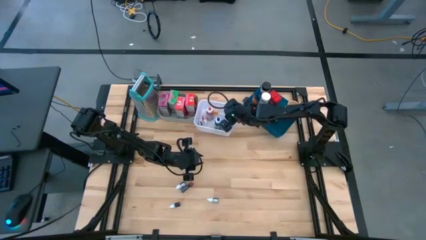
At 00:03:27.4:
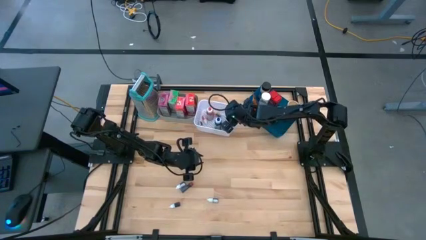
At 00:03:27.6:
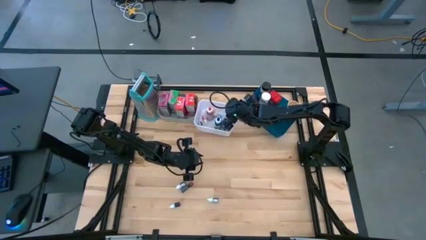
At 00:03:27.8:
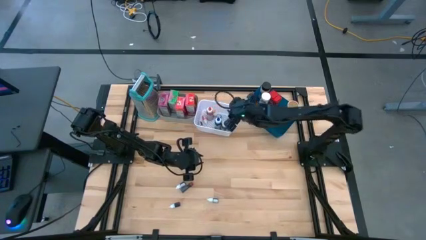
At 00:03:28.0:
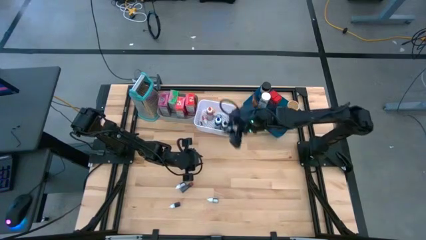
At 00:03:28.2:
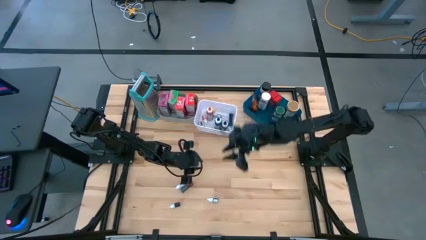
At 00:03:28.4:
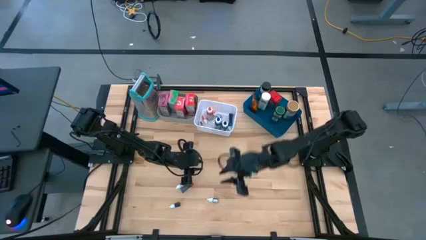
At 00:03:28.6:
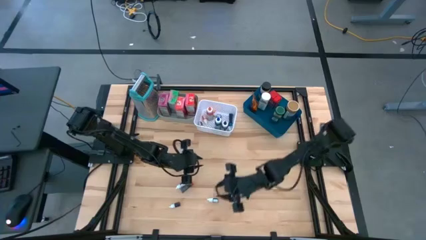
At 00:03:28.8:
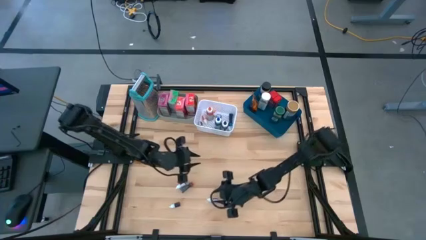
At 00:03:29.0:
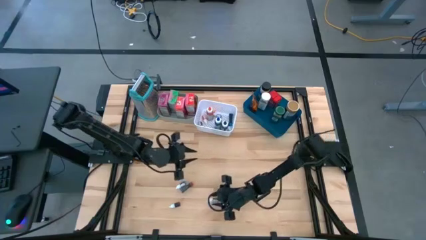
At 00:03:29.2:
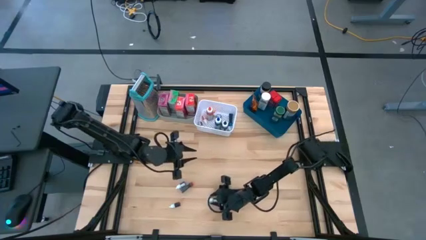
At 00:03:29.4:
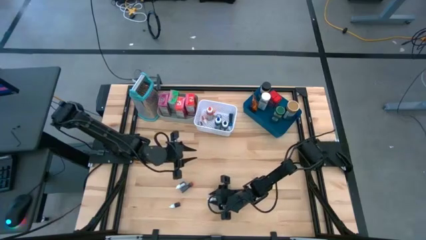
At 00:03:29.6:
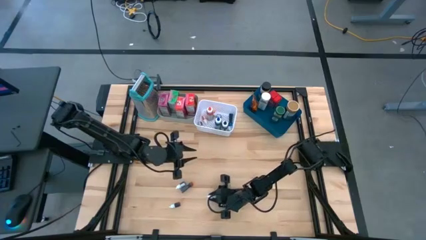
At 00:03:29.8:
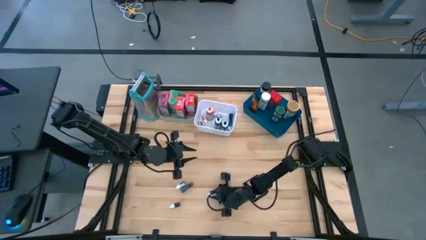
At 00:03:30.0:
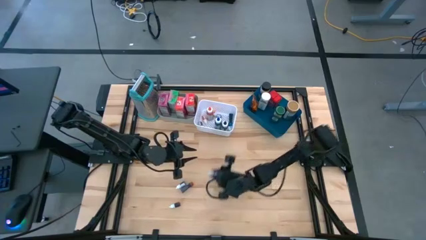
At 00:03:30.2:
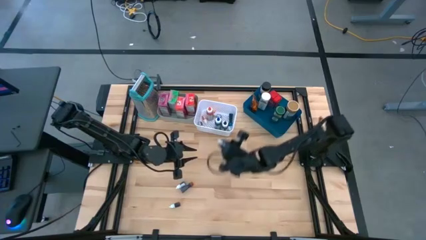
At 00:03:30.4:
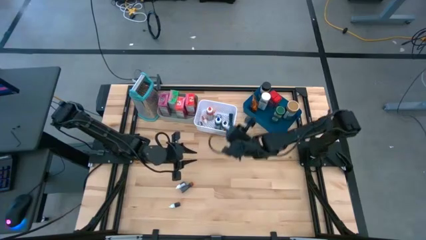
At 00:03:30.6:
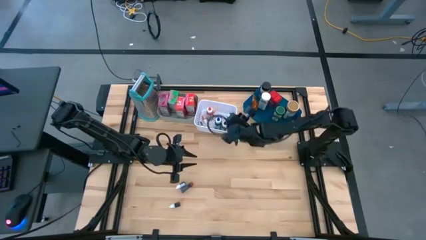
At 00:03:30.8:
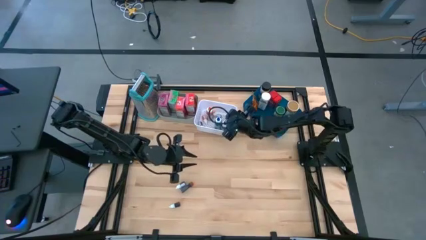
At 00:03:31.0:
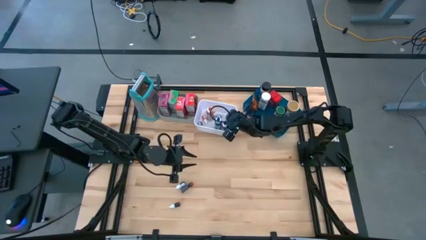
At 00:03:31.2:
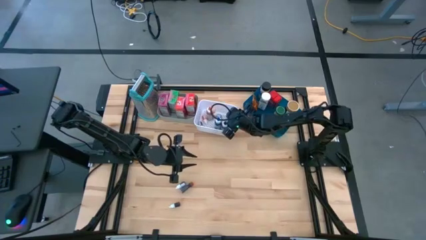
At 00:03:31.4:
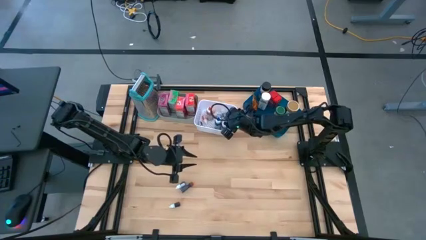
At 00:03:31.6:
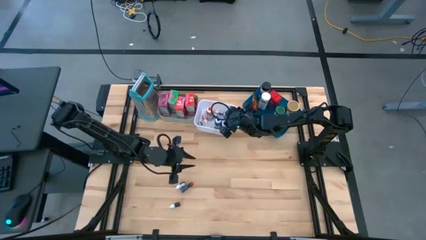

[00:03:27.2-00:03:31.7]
Task: Pick & Place Kitchen Items
Put the small purple food coloring bottle into the white bin

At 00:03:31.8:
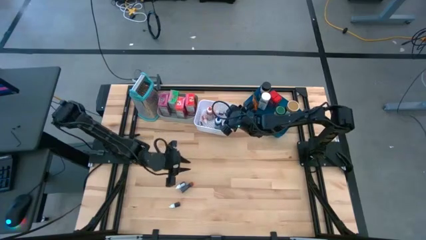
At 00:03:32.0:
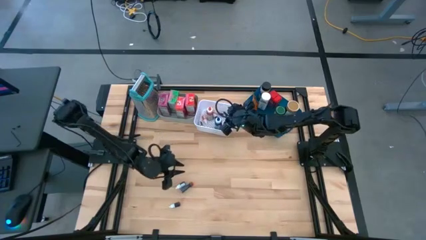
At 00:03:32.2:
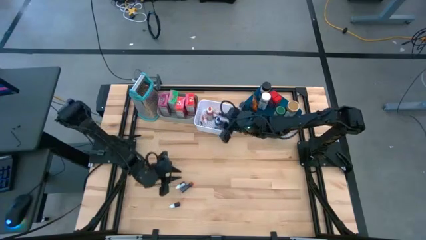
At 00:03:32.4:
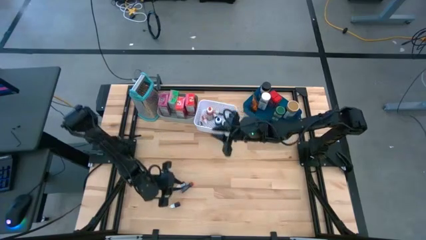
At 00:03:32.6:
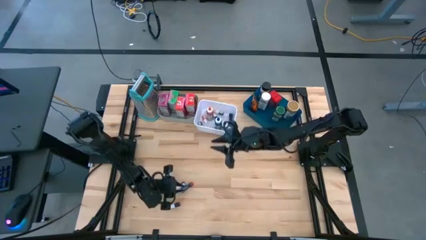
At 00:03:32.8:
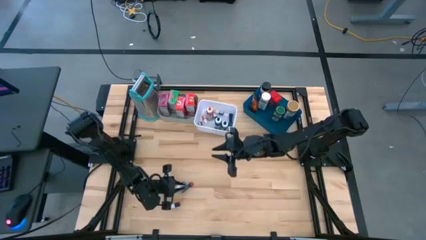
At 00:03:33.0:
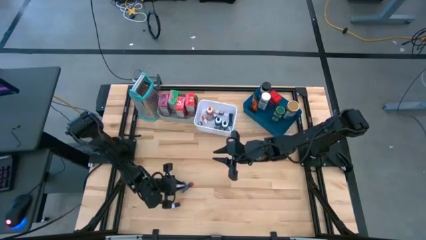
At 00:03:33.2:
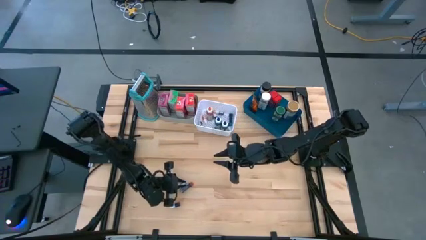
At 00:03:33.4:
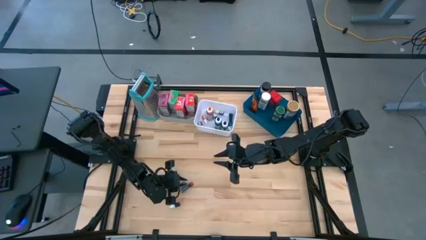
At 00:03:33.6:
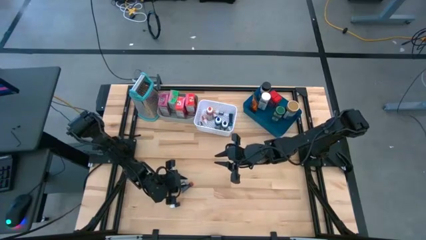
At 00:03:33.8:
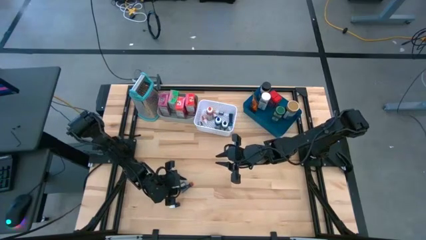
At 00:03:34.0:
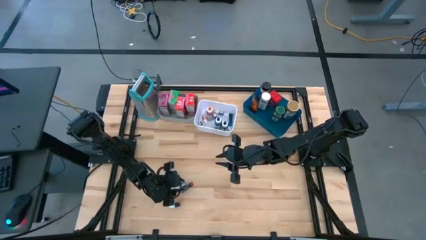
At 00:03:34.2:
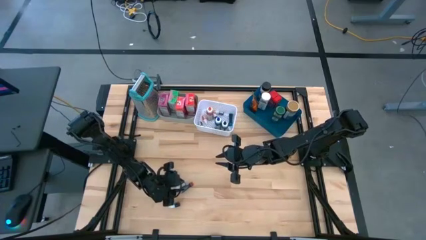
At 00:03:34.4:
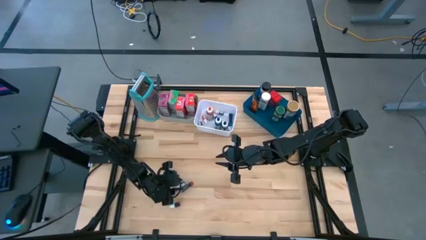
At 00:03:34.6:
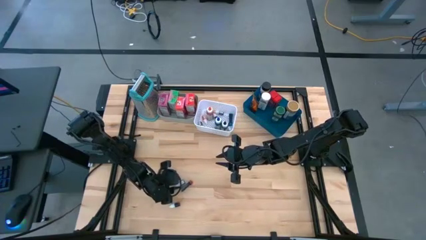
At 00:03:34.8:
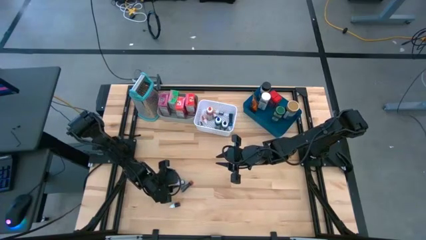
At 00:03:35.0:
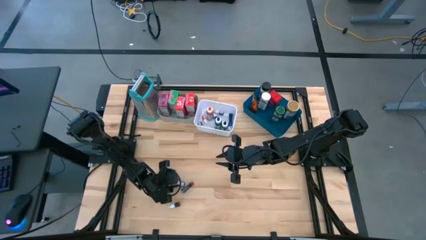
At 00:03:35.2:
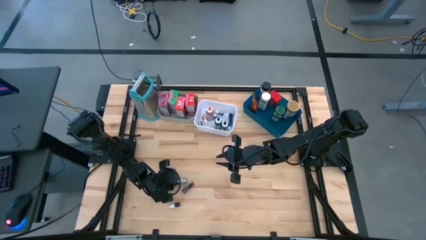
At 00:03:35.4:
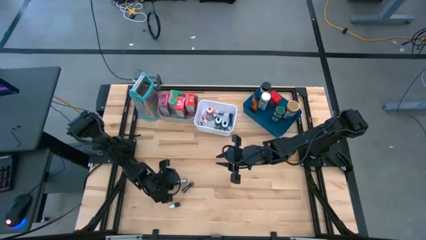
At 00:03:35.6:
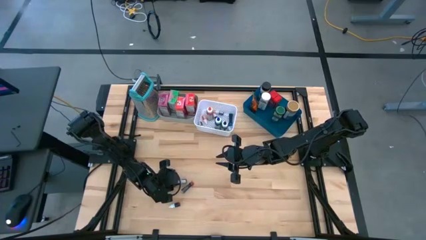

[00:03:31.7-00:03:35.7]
Put the small black food coloring bottle into the white bin

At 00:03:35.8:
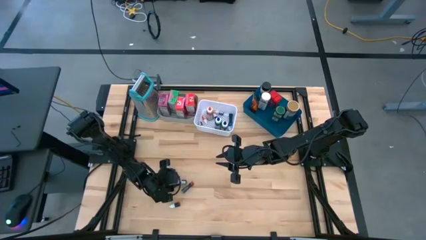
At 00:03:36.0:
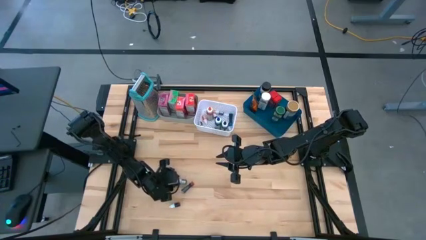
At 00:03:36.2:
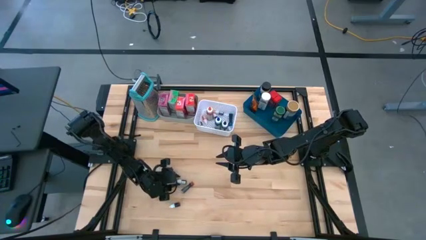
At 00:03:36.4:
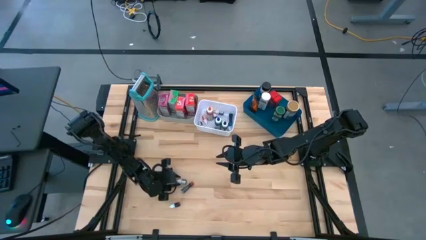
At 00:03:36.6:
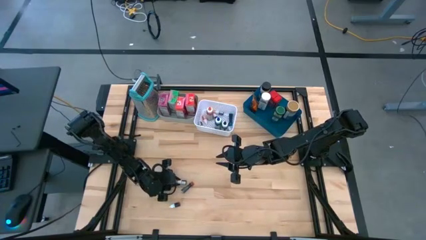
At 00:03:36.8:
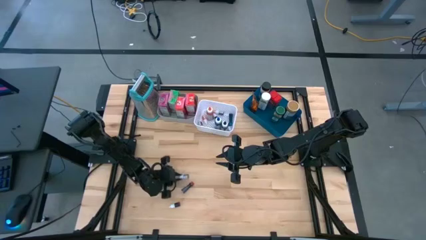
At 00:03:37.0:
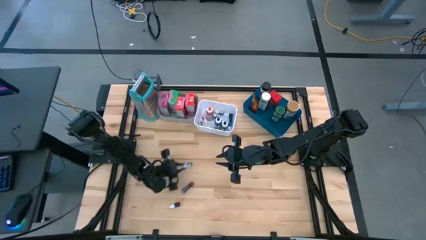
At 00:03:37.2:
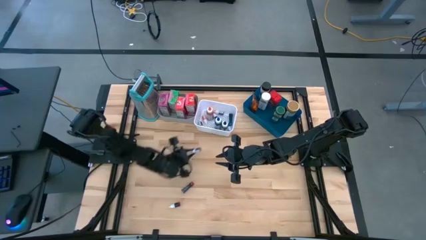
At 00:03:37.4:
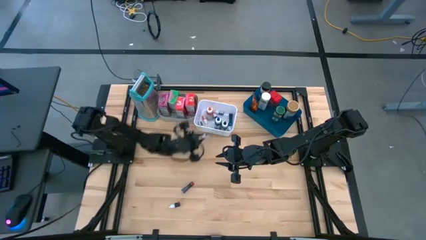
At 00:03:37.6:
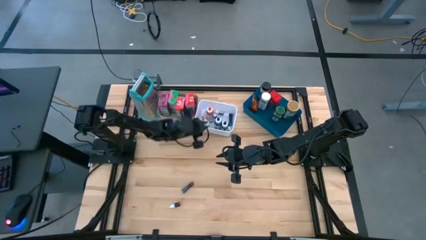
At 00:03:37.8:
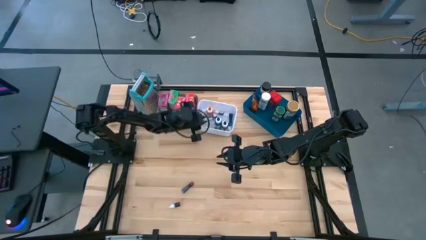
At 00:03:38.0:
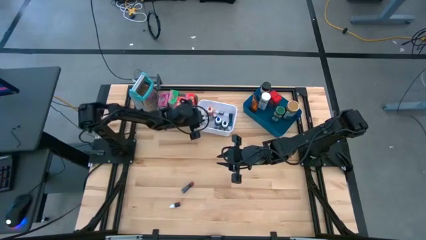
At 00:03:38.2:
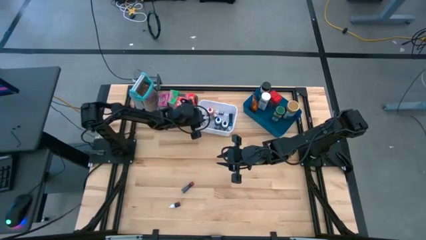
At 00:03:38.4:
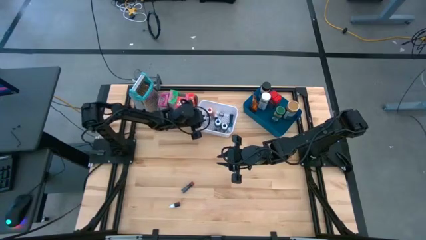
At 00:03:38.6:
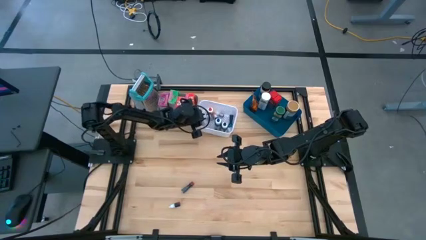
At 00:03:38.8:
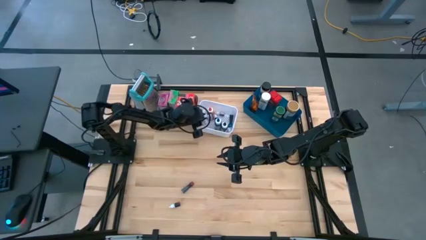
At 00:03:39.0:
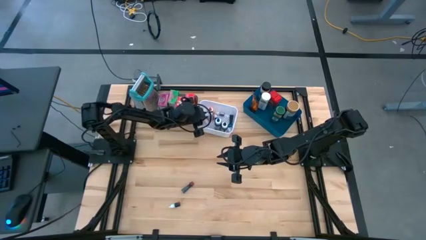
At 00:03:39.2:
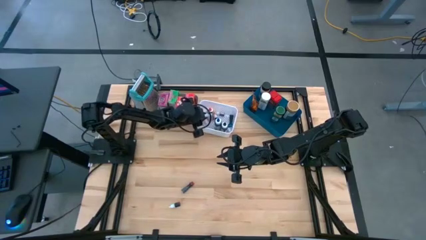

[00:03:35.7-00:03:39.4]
Put the small black food coloring bottle into the white bin

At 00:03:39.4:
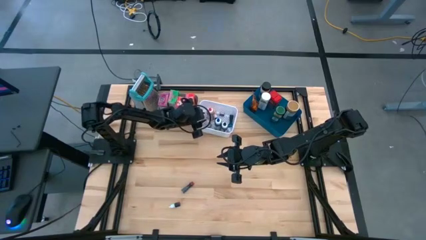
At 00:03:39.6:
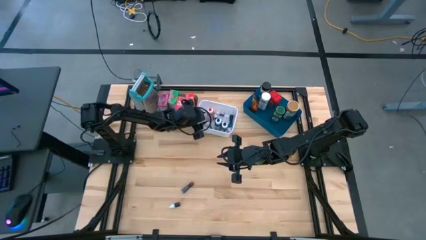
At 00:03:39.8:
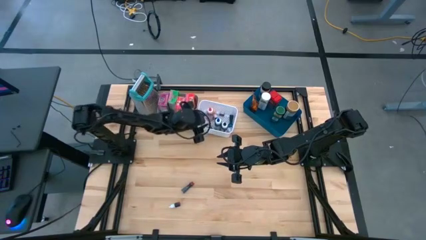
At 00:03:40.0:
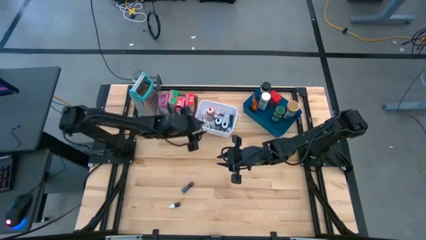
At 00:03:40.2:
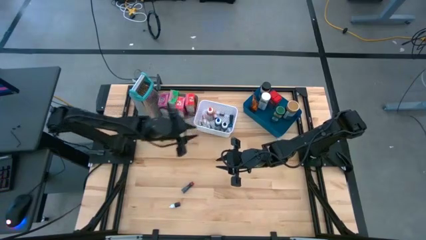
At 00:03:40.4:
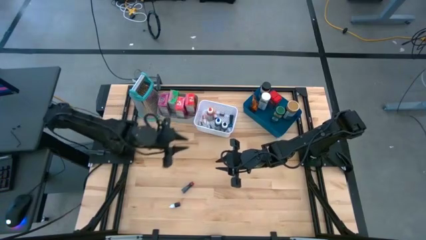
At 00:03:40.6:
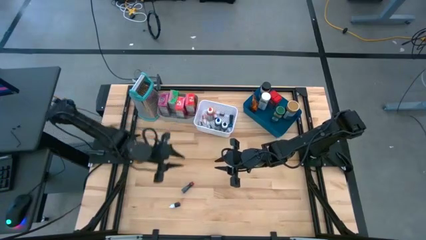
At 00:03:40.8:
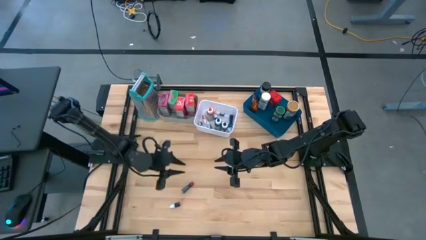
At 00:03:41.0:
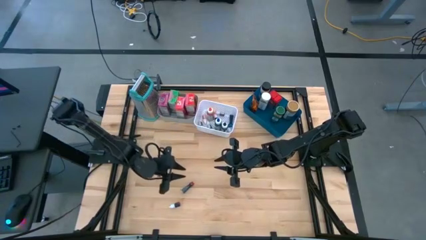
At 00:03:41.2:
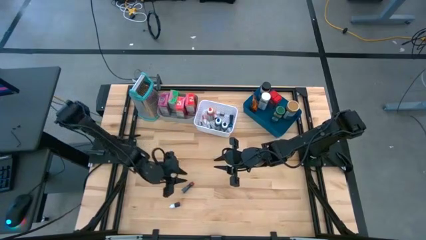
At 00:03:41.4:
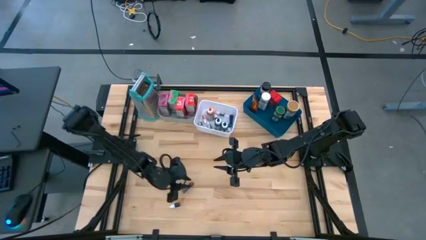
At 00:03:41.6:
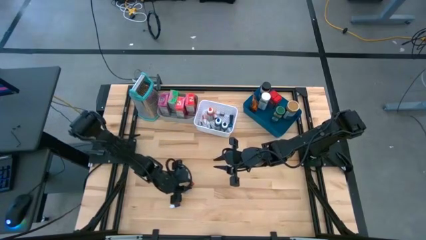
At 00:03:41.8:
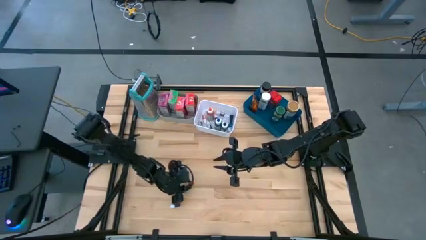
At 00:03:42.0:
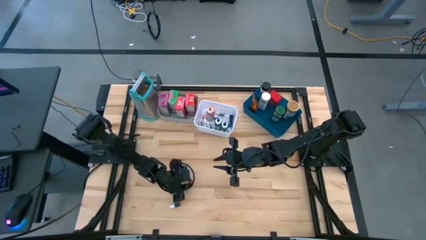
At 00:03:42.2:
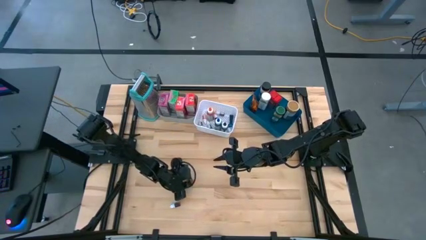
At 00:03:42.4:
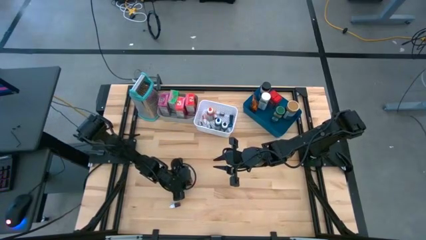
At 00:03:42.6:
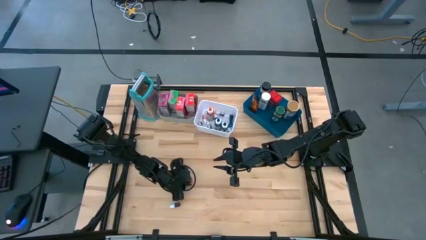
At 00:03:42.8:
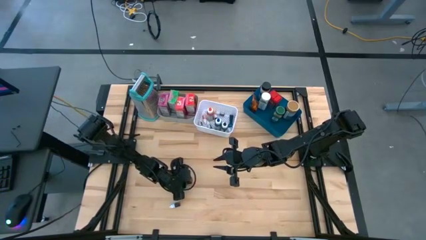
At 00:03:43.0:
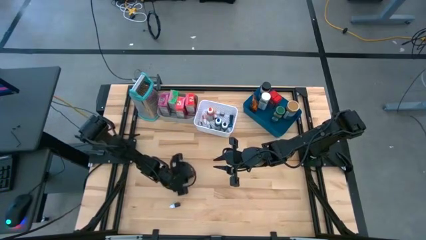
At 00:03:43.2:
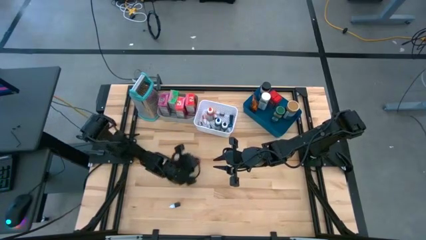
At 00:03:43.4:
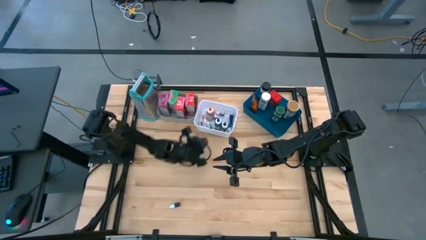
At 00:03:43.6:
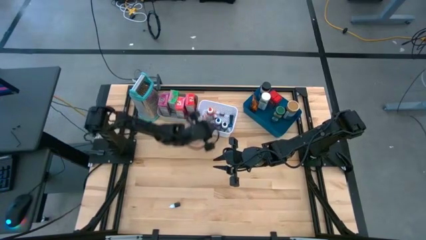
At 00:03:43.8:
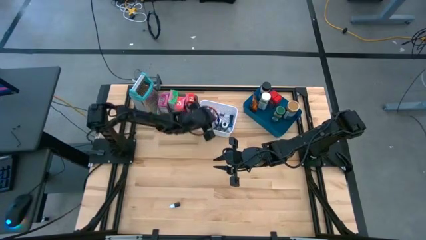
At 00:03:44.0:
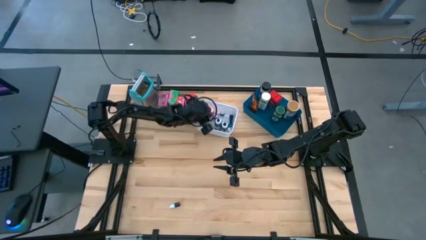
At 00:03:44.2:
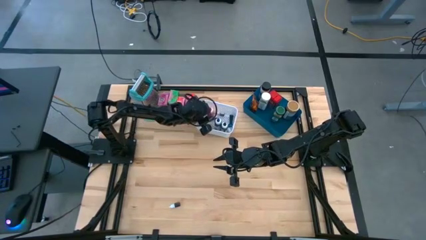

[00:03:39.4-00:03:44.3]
Put the medium red food coloring bottle into the white bin
